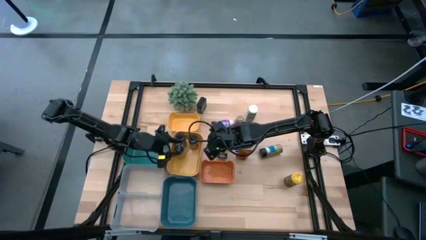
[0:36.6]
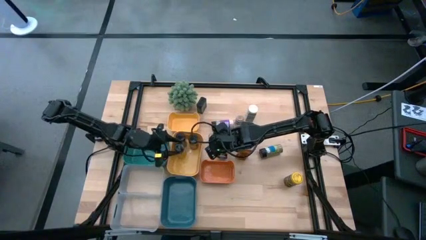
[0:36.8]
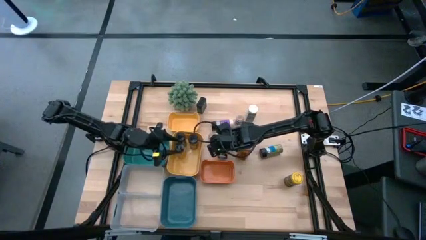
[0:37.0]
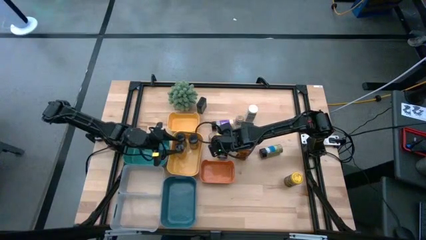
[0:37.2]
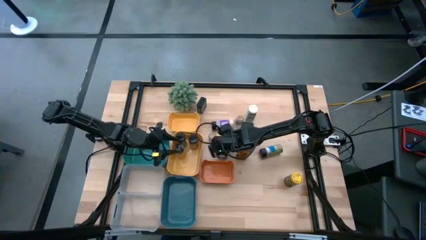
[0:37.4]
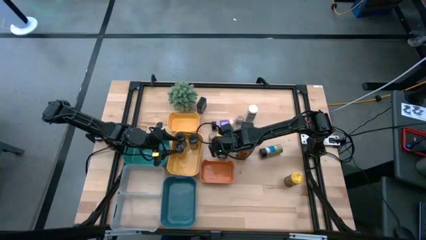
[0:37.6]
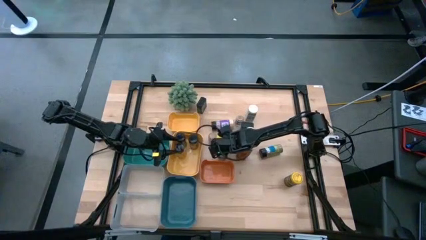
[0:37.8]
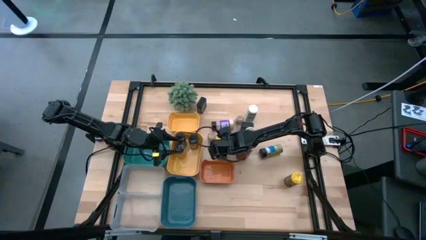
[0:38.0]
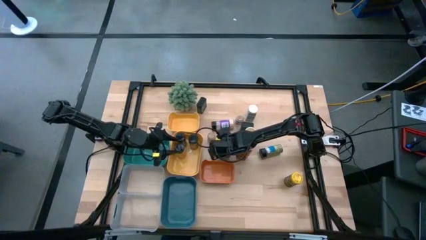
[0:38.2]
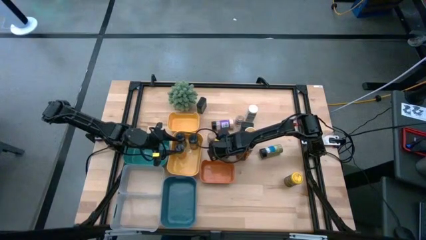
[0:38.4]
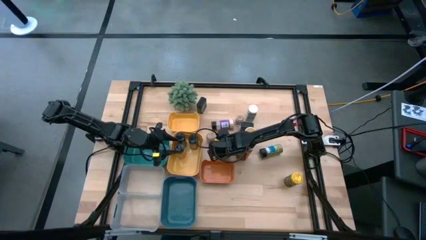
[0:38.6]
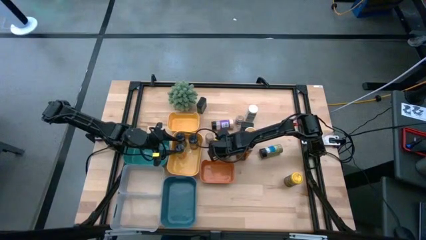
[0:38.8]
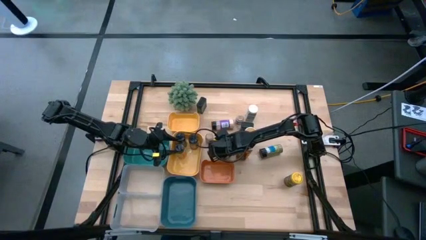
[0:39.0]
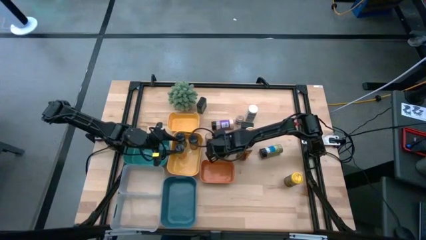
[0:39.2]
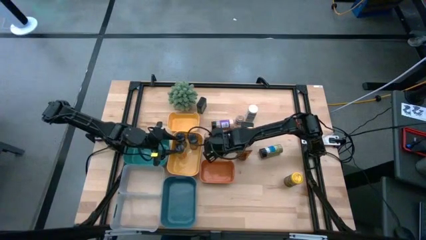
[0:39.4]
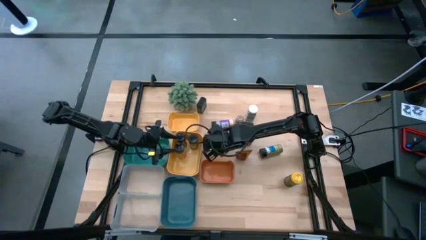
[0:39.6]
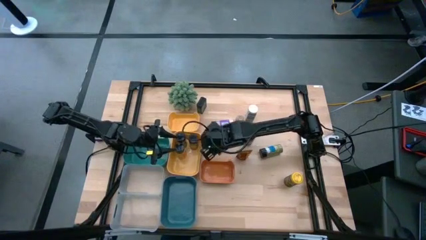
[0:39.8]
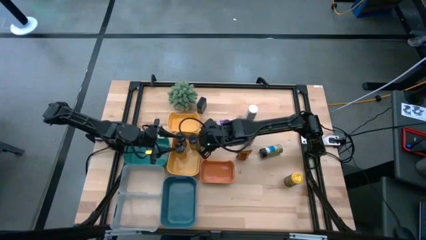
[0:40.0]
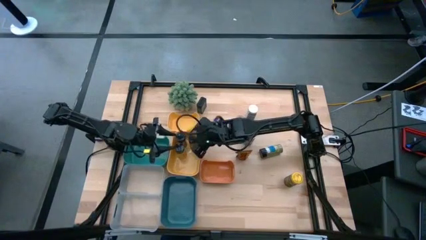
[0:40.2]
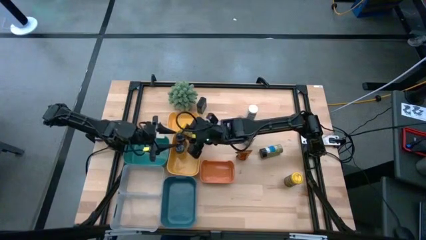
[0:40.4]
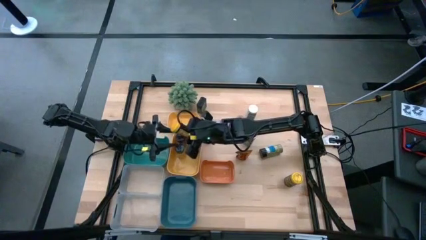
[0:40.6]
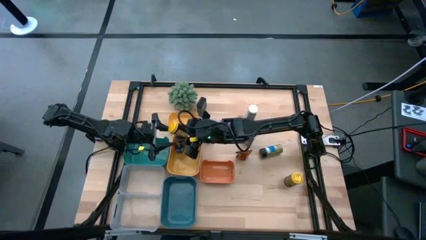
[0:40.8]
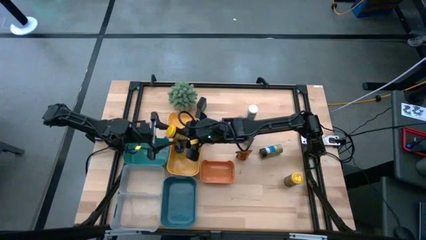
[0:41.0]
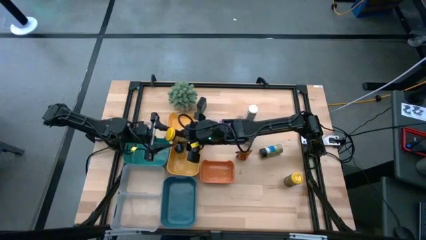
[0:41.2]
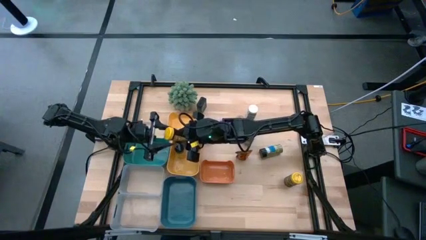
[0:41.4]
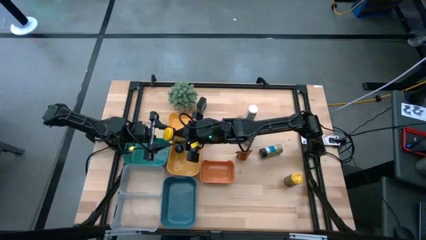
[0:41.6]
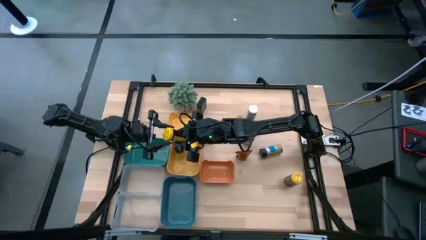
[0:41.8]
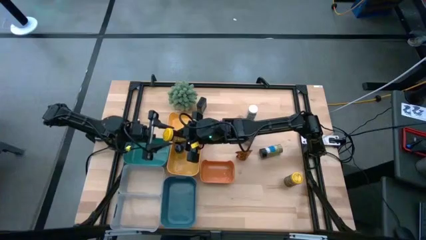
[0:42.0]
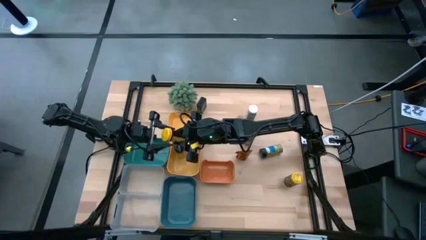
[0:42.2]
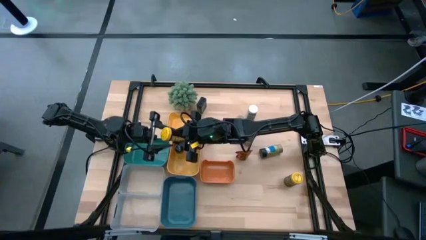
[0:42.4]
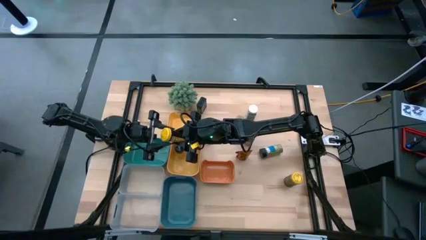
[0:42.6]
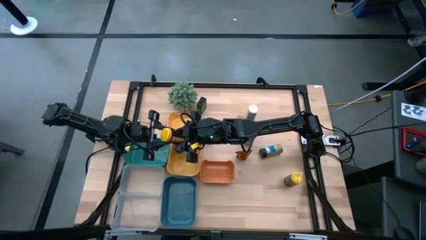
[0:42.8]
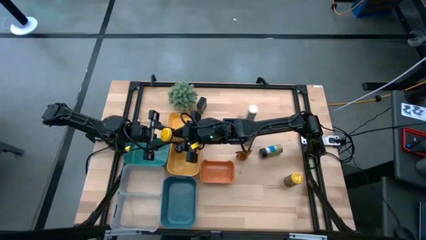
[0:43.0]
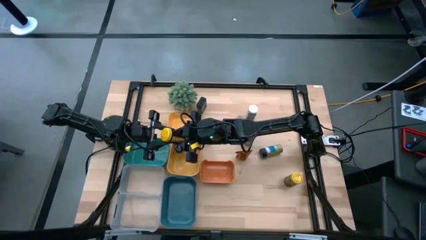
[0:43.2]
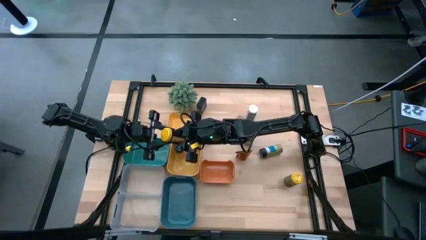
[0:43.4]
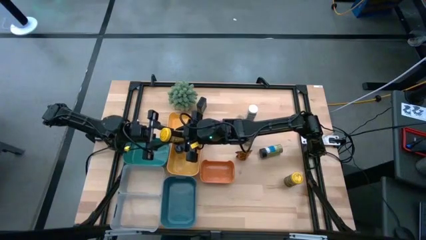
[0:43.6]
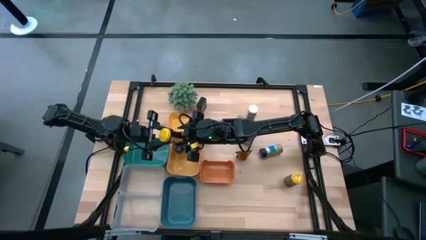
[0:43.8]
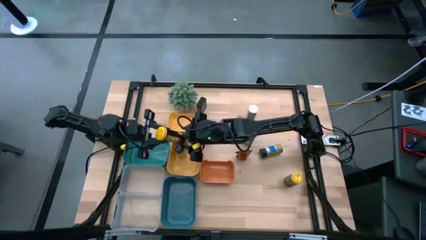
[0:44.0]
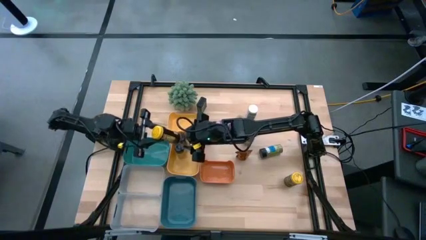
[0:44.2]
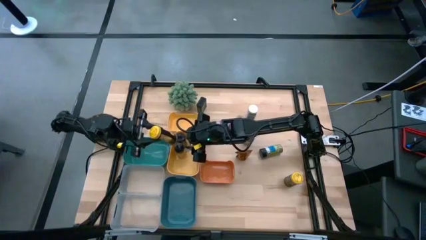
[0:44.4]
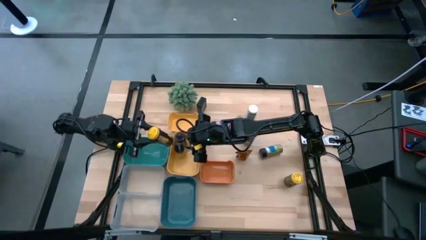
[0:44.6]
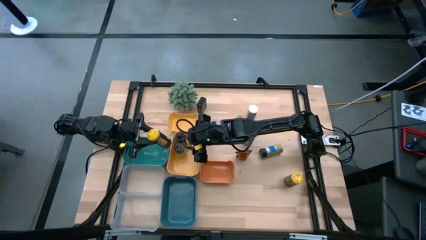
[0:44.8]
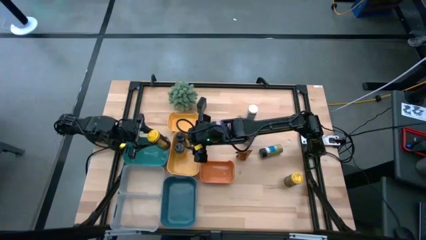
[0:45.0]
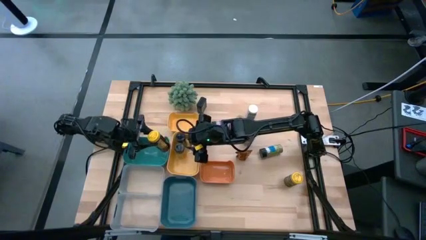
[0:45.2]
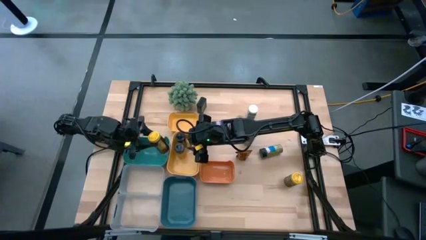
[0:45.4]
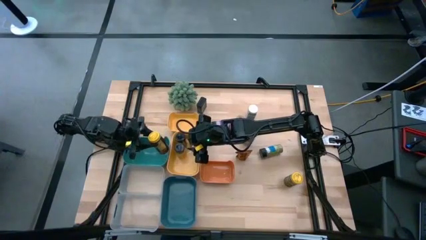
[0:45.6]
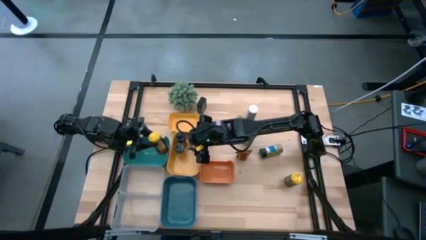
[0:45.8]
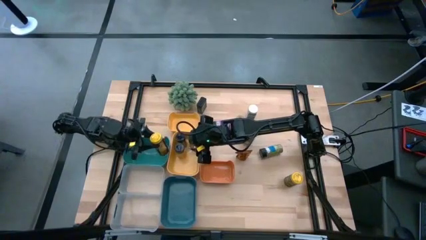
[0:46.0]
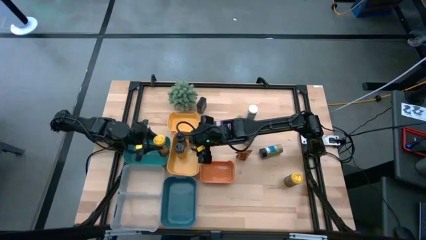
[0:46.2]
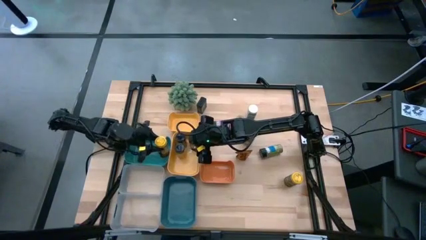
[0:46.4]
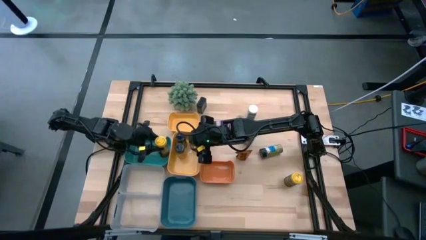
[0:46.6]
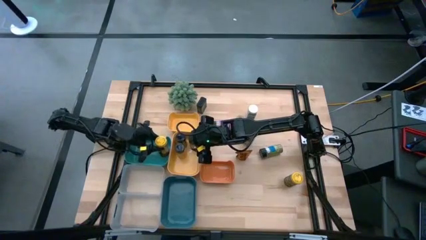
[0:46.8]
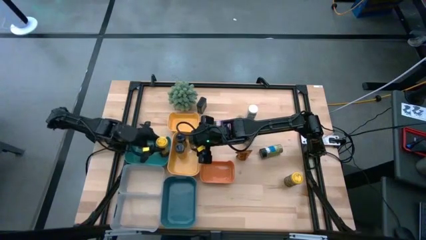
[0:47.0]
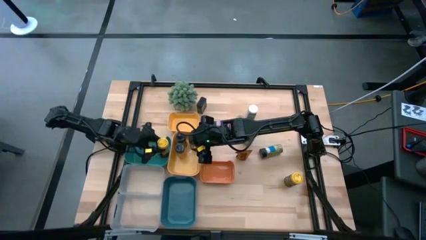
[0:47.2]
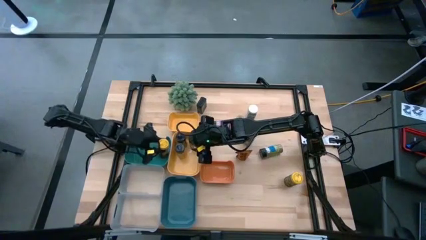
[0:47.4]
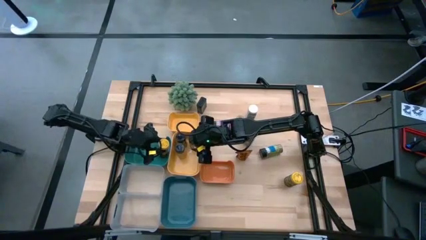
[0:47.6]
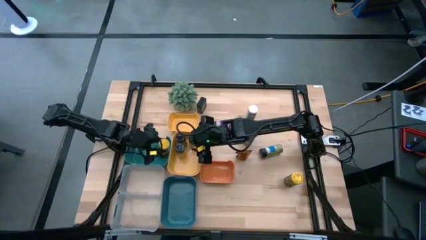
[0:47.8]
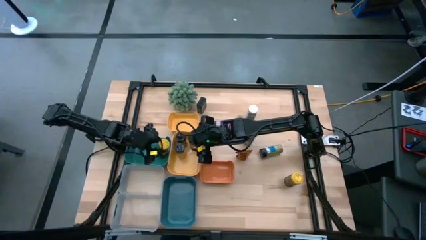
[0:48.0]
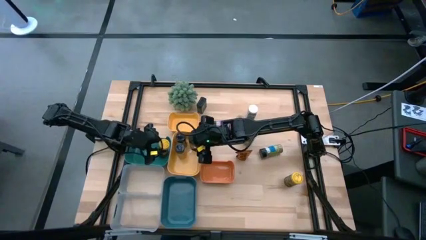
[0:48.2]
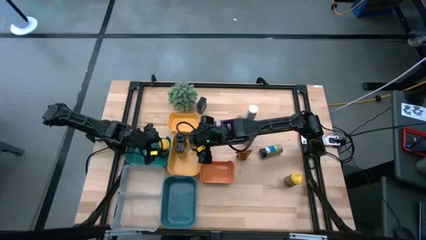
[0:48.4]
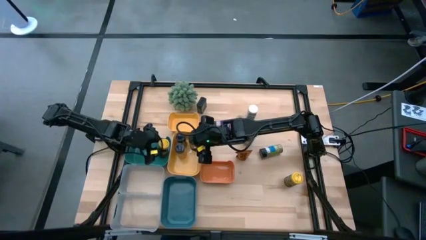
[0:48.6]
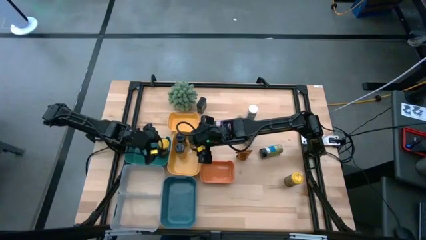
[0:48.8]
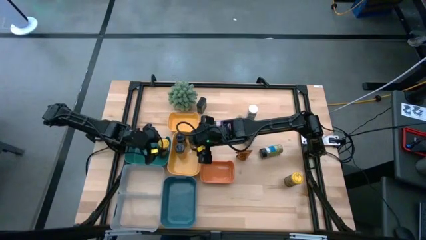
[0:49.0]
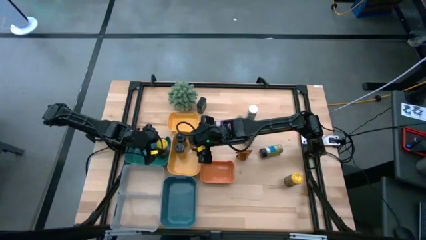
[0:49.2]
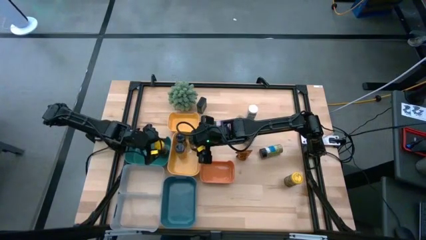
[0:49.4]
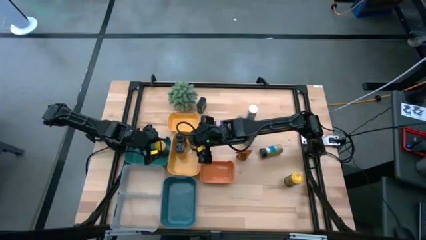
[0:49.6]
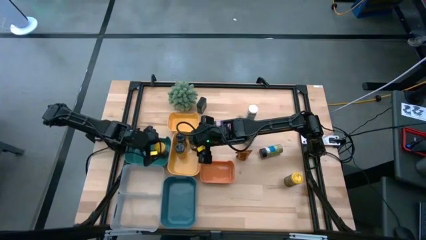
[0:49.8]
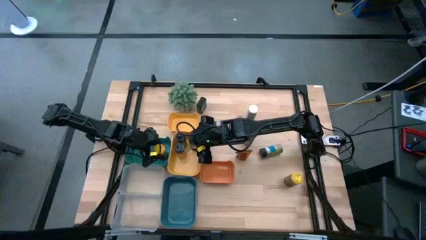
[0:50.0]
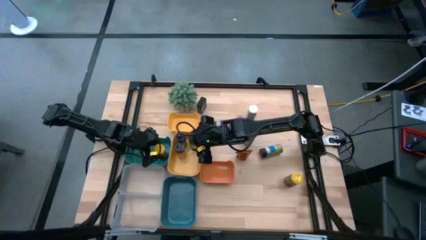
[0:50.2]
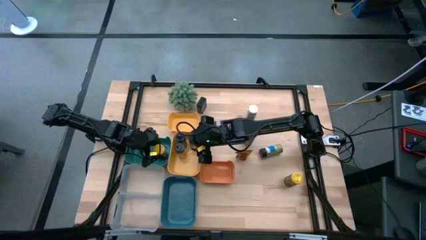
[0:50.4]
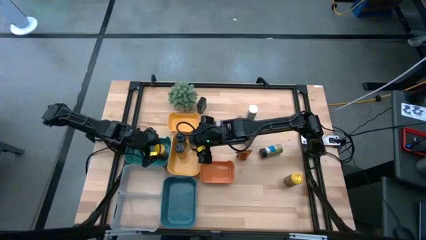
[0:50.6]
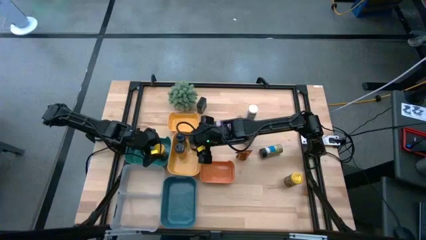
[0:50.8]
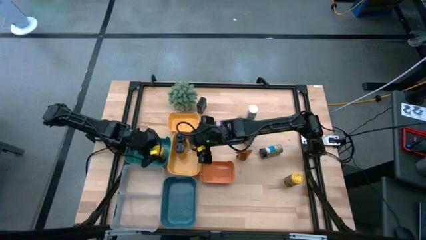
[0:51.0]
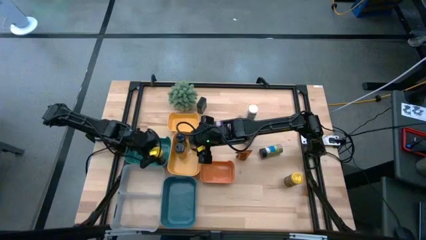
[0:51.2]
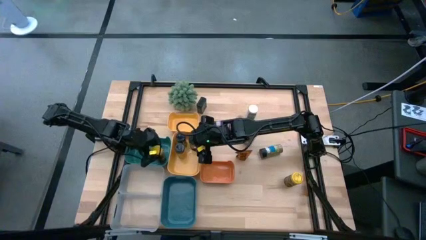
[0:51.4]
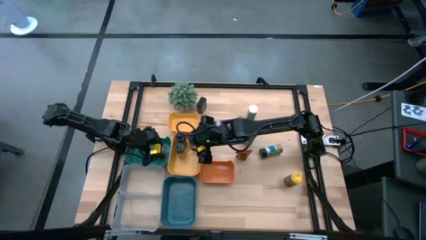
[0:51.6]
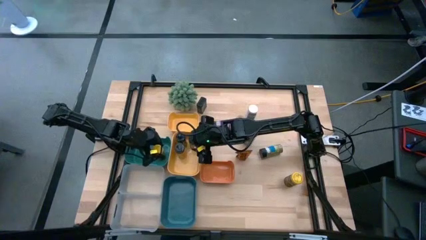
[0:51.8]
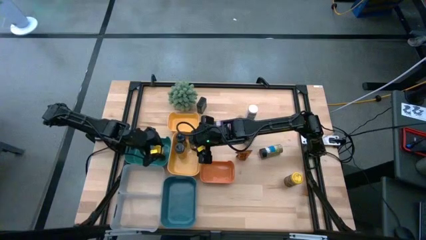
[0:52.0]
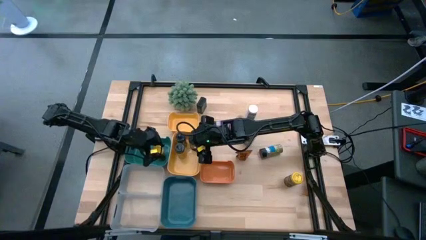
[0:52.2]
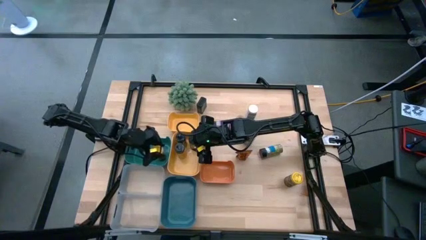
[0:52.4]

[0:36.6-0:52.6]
Task: Sort spices by type
Put the yellow seasoning bottle into the green bin
